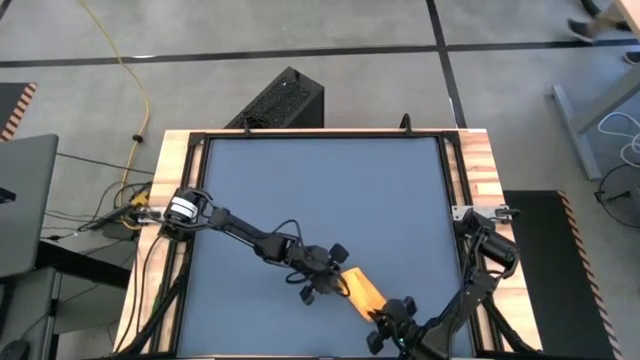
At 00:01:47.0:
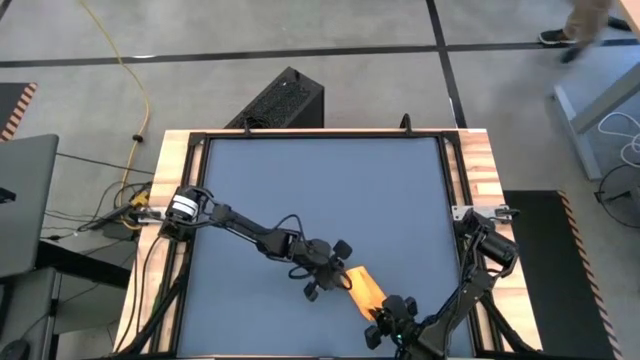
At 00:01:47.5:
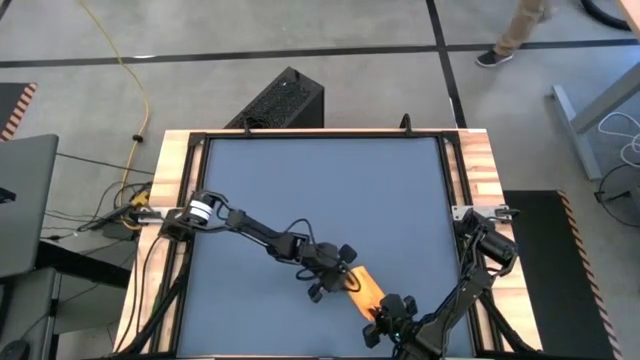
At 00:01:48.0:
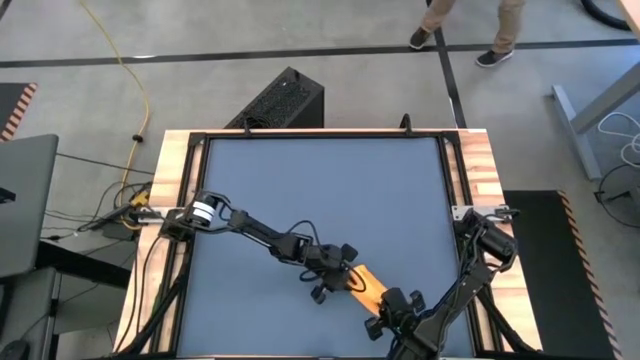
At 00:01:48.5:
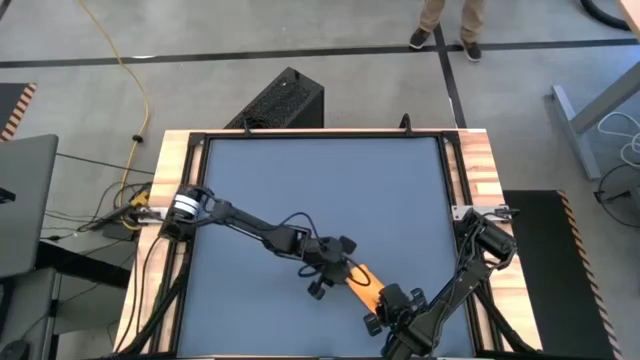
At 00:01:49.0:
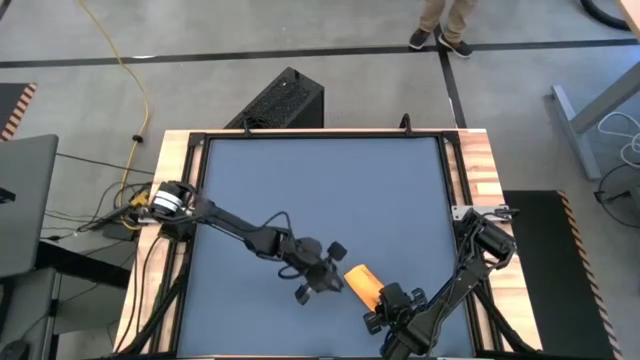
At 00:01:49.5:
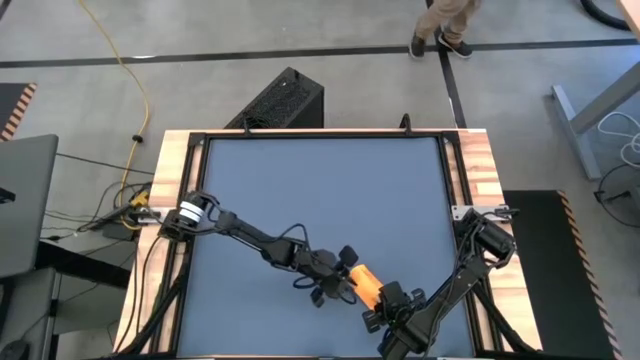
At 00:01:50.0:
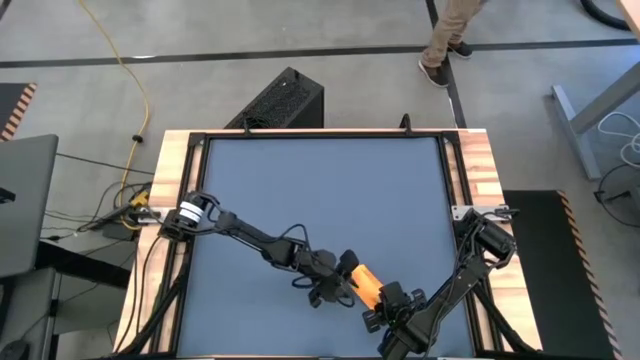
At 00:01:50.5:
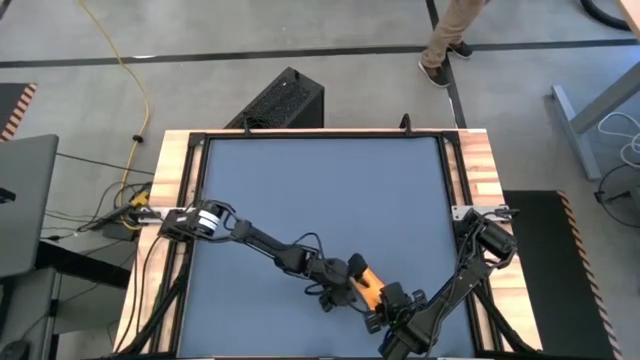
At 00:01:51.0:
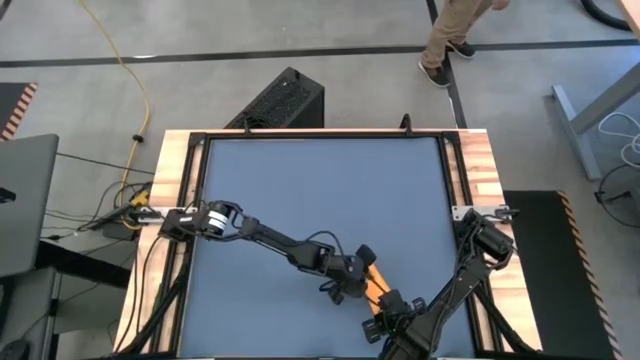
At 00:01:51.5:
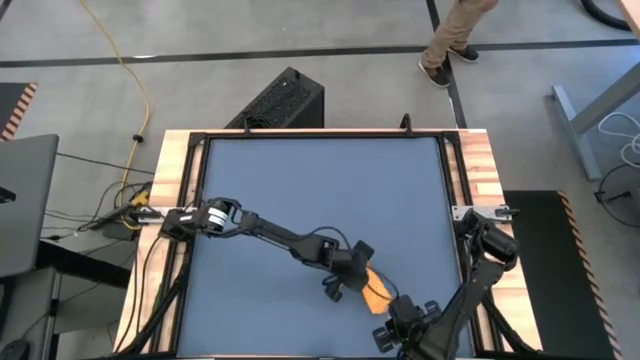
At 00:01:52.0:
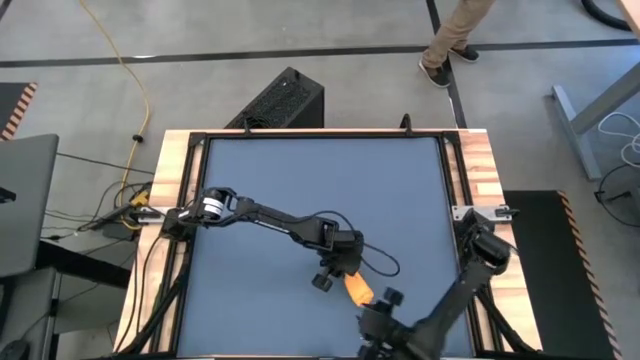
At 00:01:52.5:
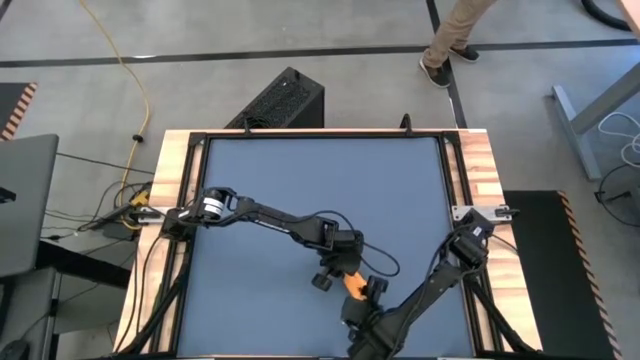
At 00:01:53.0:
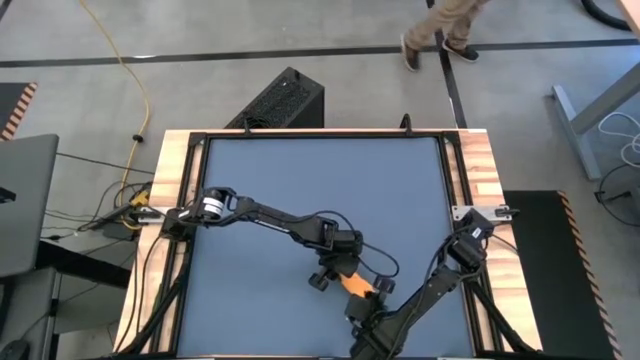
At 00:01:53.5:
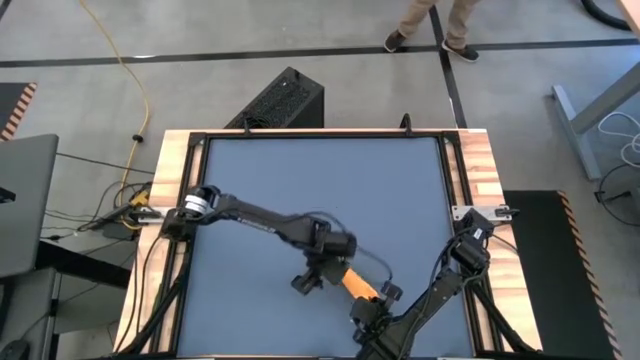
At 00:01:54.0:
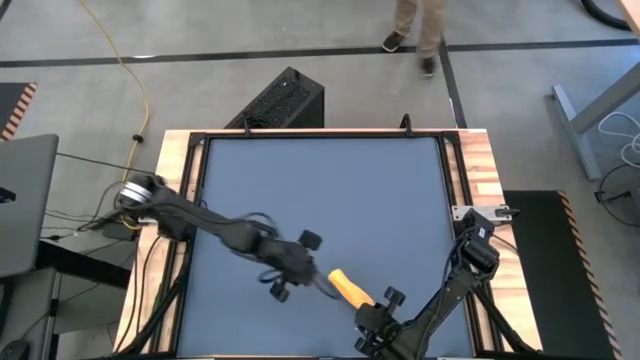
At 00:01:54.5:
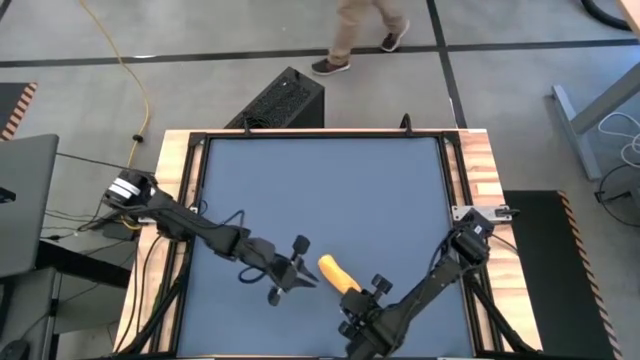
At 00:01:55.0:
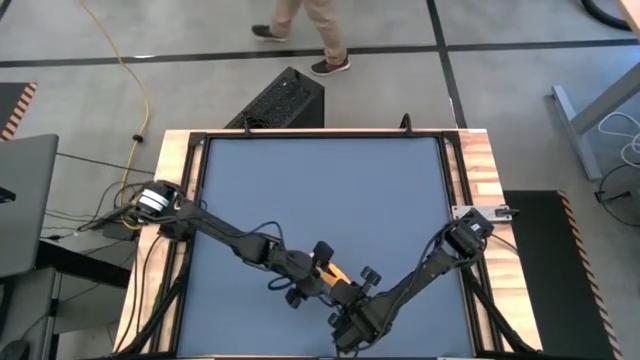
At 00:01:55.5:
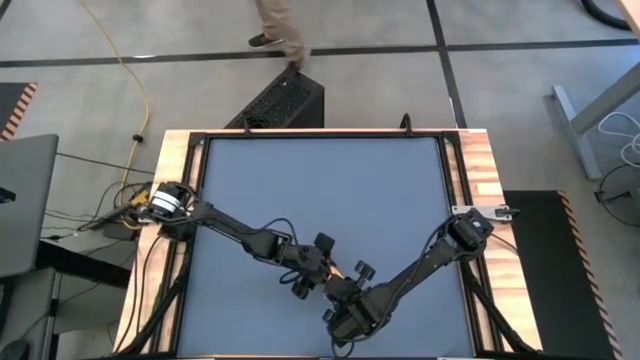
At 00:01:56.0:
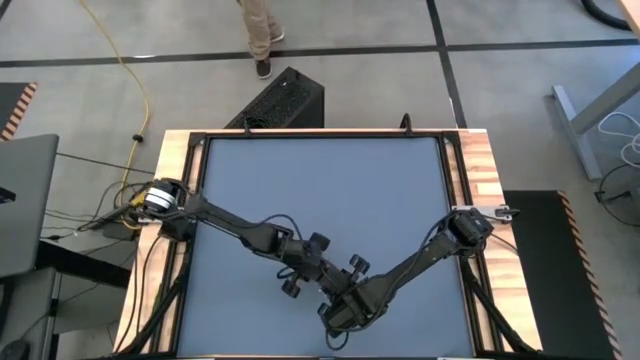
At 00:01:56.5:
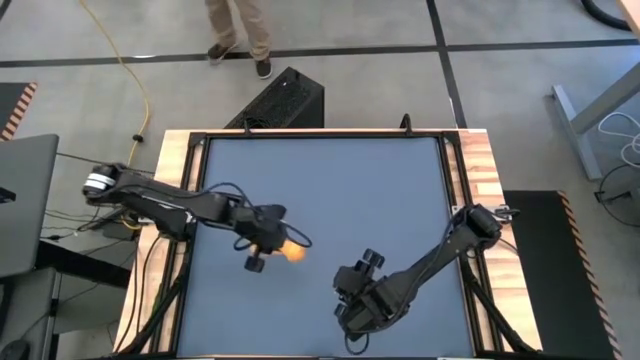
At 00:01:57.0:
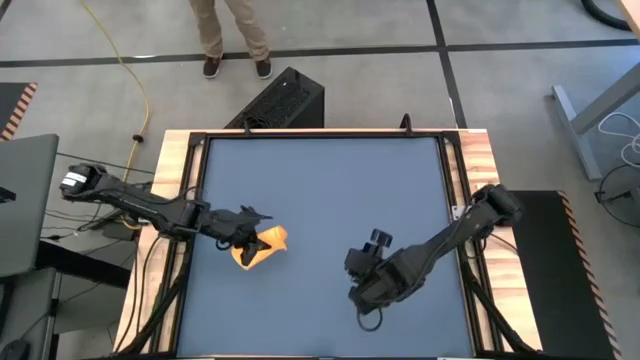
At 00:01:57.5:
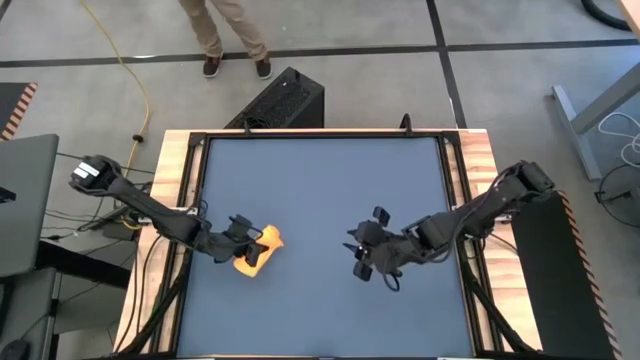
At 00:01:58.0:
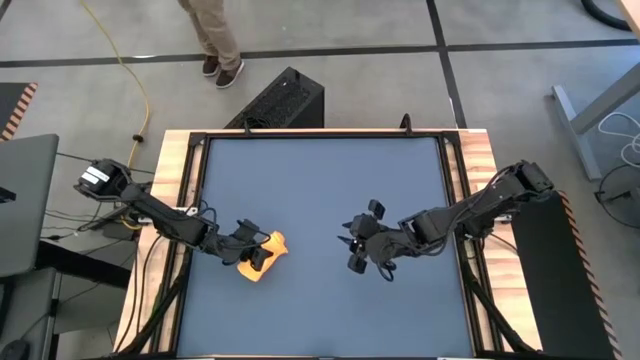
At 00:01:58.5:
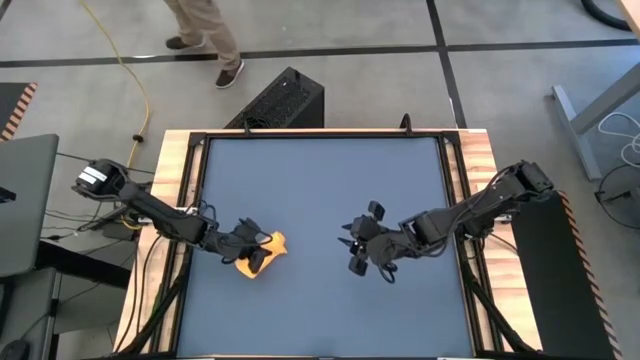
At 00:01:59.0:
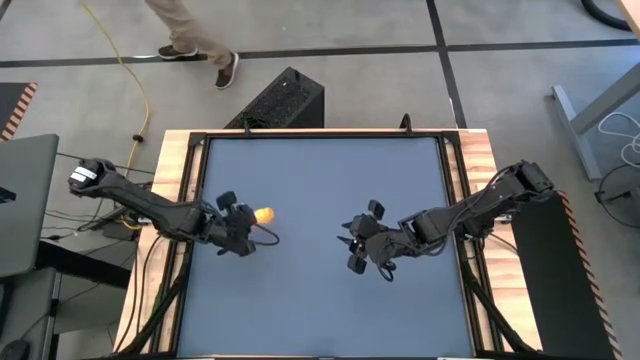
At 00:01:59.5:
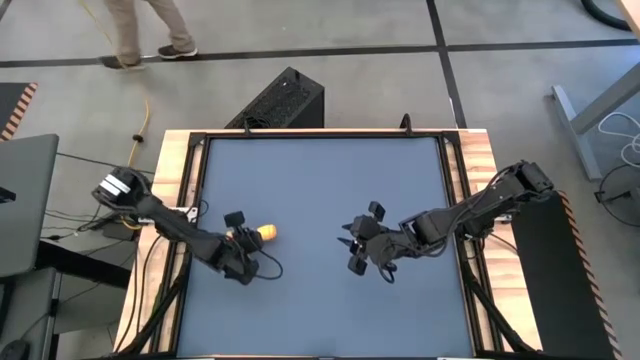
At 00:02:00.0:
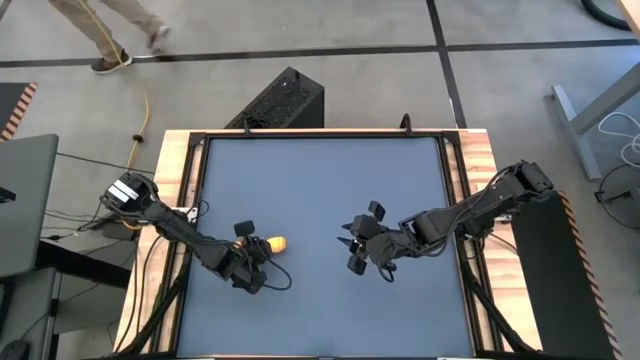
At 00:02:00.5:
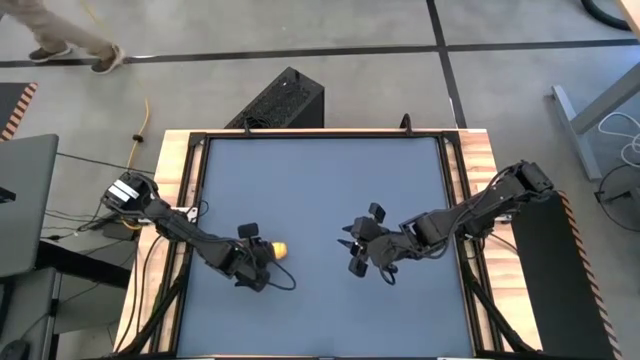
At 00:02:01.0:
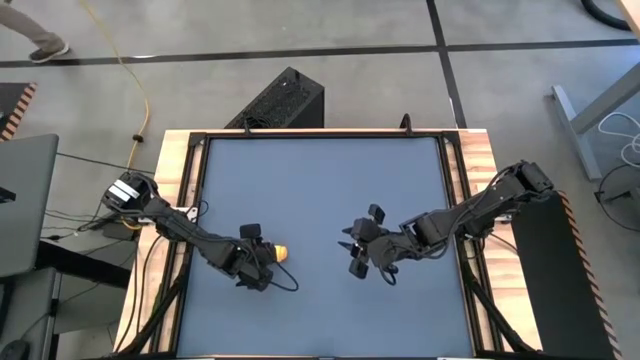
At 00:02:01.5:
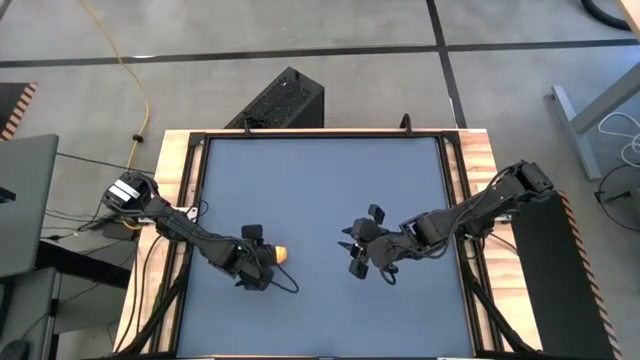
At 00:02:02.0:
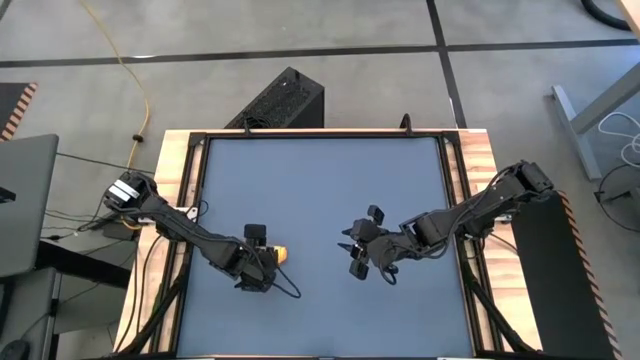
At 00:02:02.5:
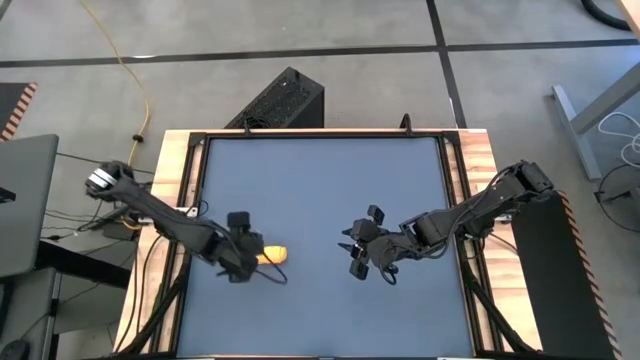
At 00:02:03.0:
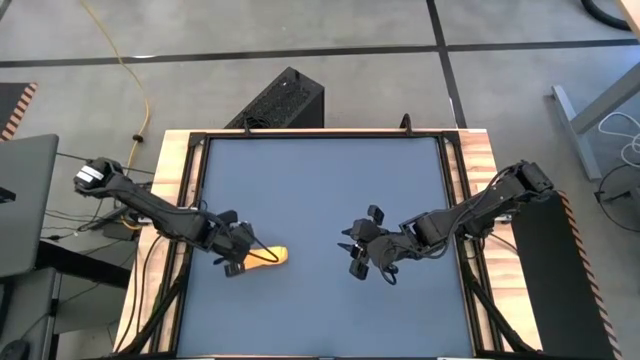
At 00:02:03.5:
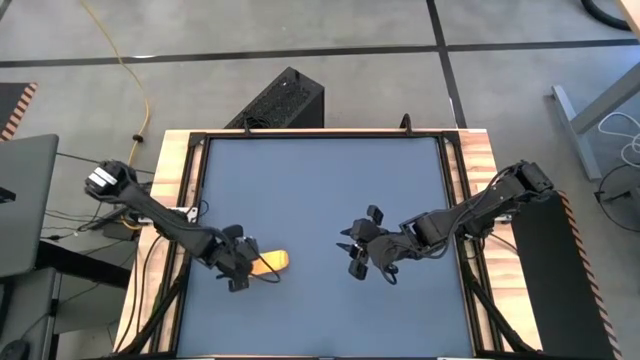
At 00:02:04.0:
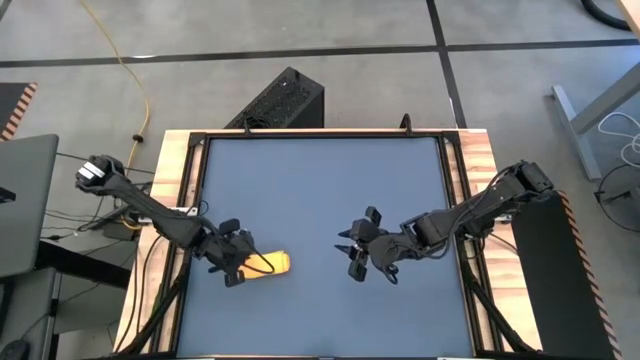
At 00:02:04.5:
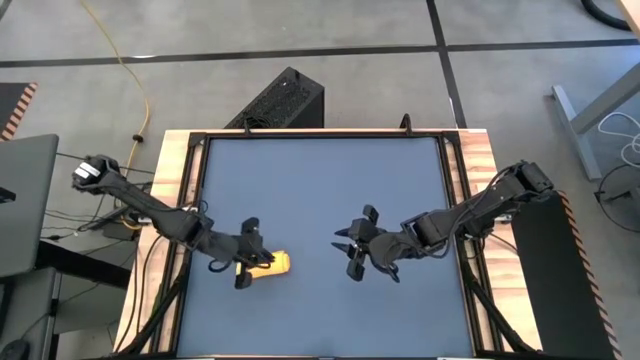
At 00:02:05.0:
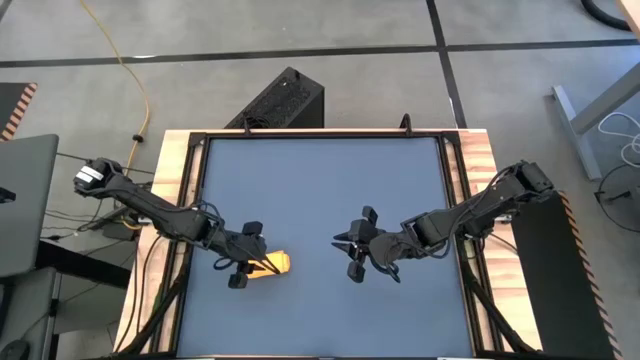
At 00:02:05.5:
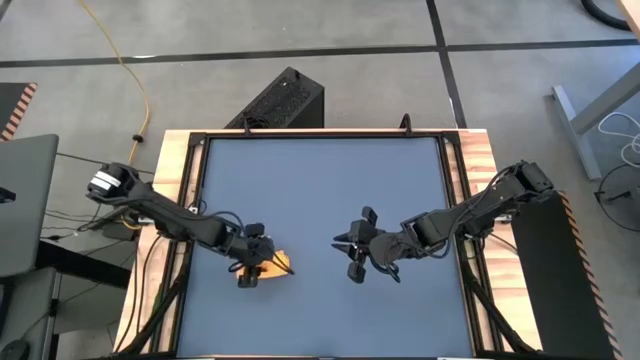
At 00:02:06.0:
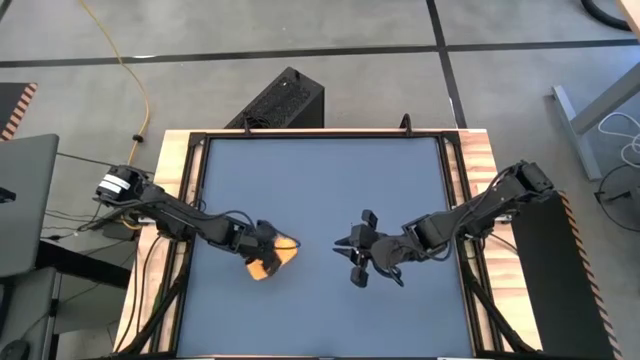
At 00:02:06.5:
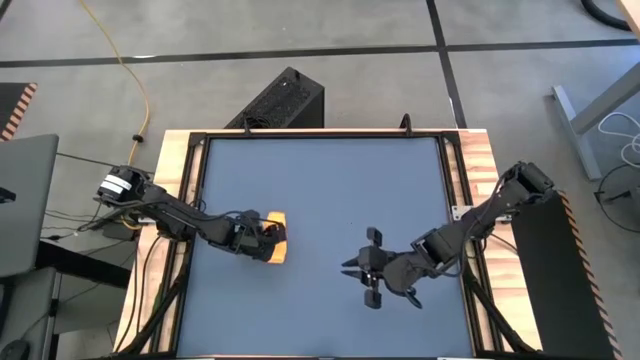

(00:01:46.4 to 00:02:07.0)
Task: Roll towel into tight, uniform cylinder
Roll the orange microfiber cloth
